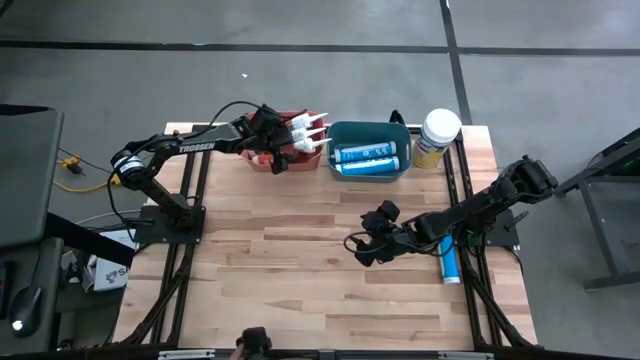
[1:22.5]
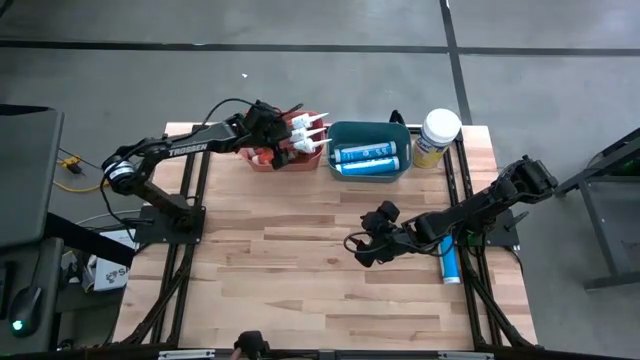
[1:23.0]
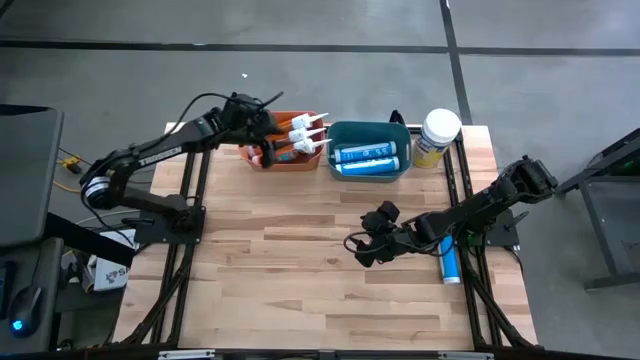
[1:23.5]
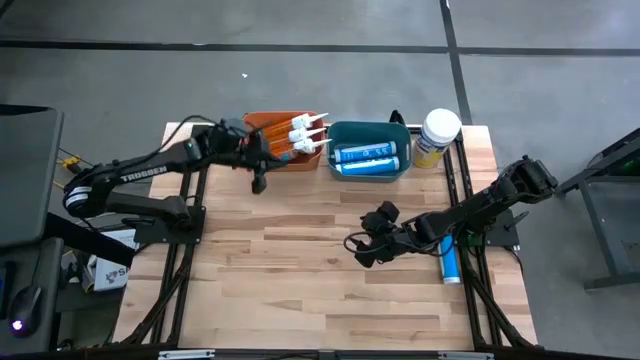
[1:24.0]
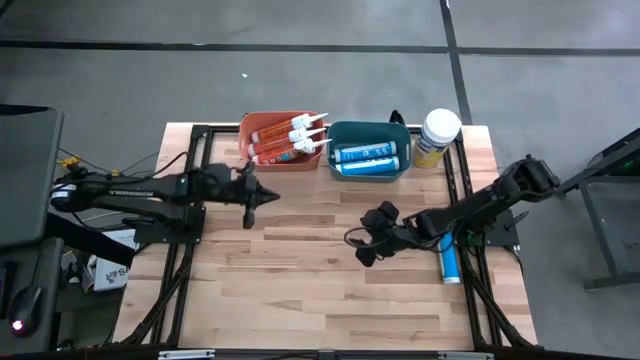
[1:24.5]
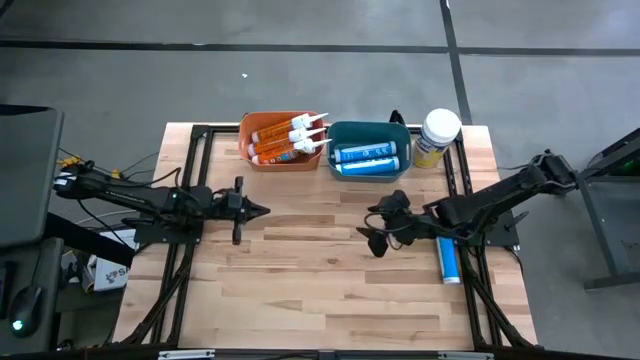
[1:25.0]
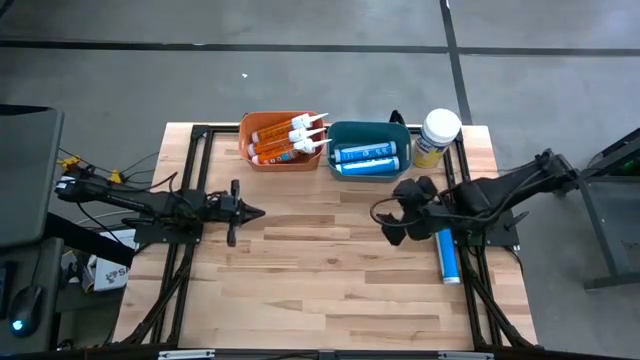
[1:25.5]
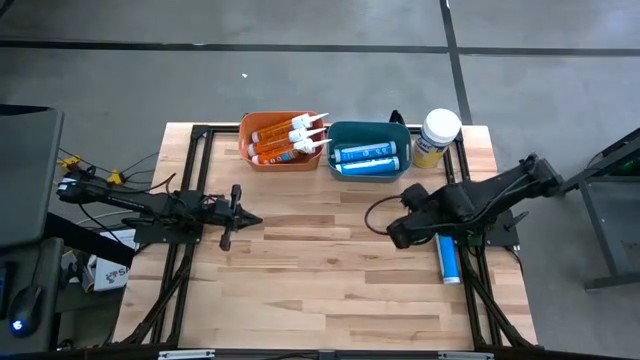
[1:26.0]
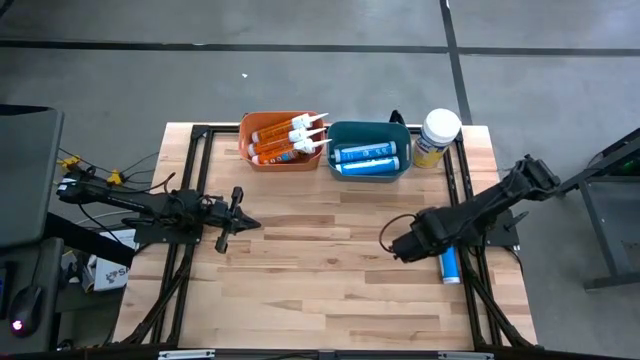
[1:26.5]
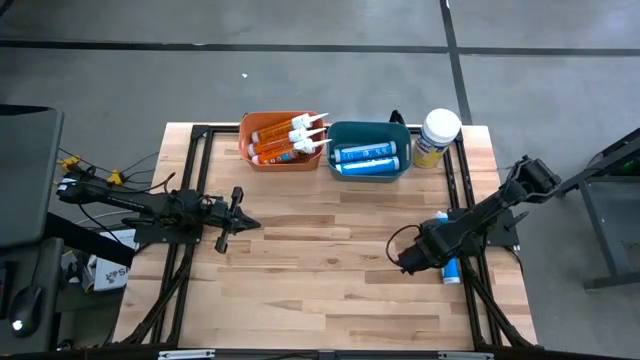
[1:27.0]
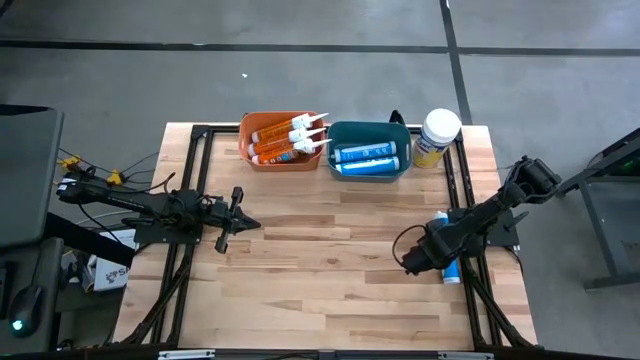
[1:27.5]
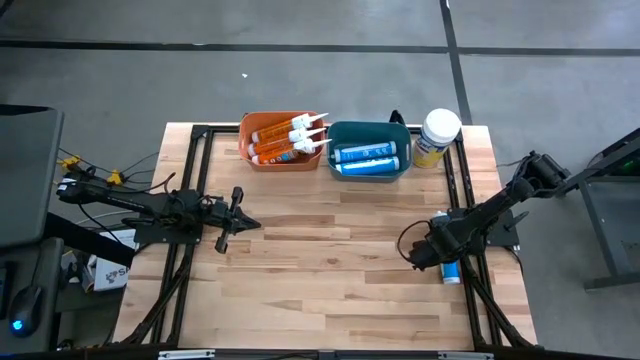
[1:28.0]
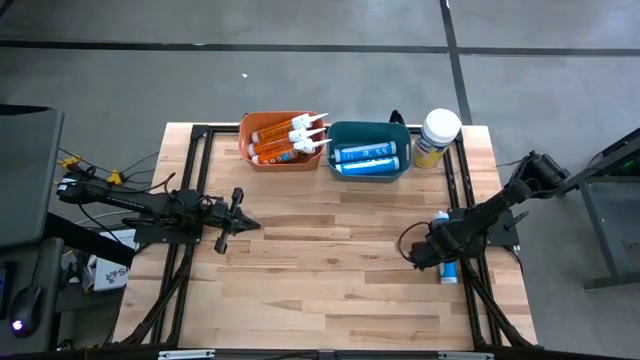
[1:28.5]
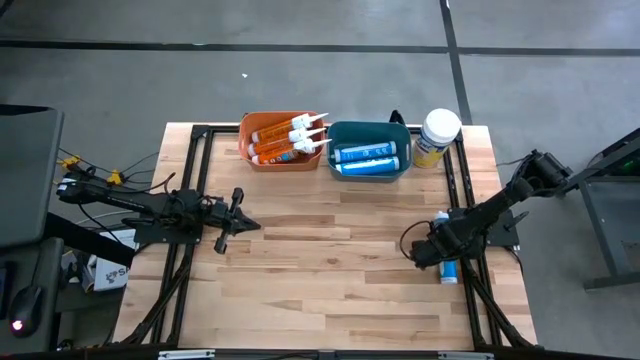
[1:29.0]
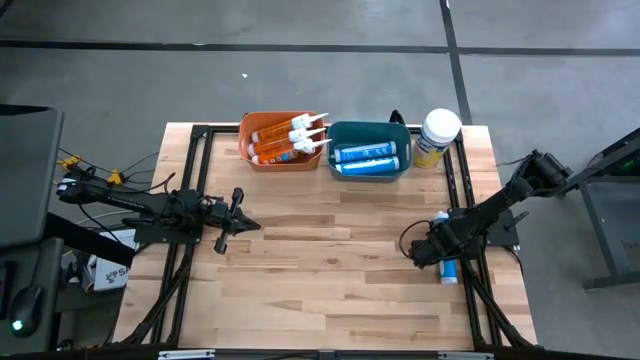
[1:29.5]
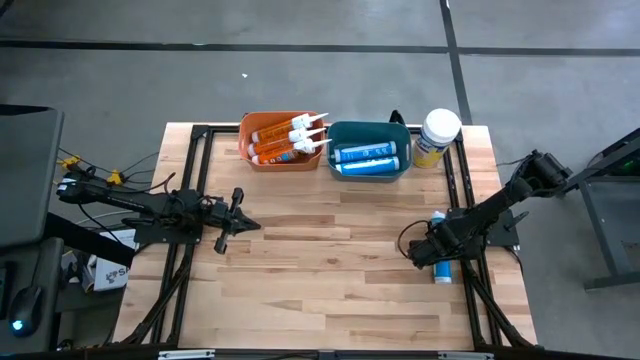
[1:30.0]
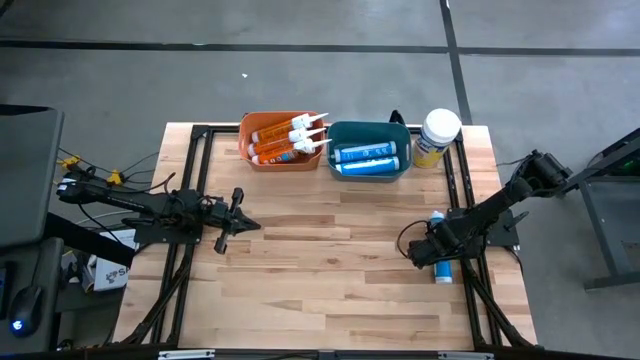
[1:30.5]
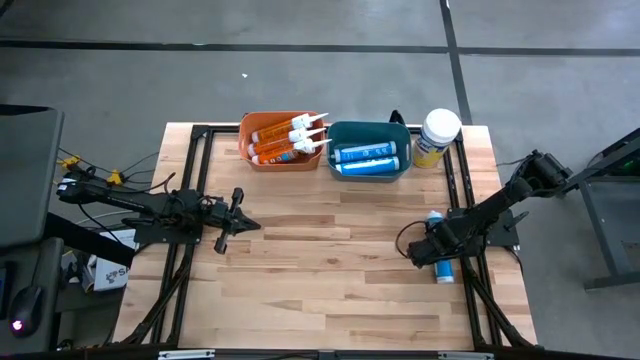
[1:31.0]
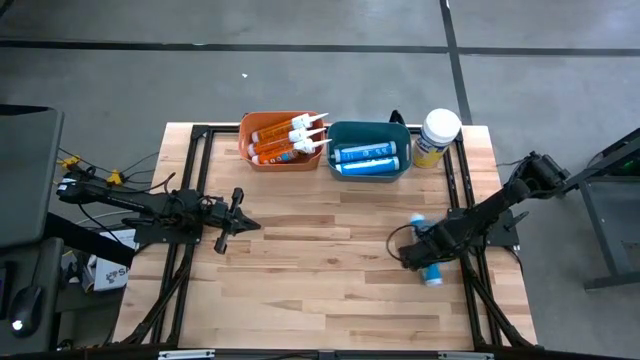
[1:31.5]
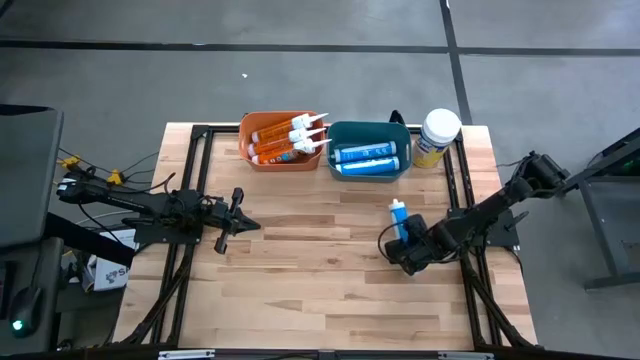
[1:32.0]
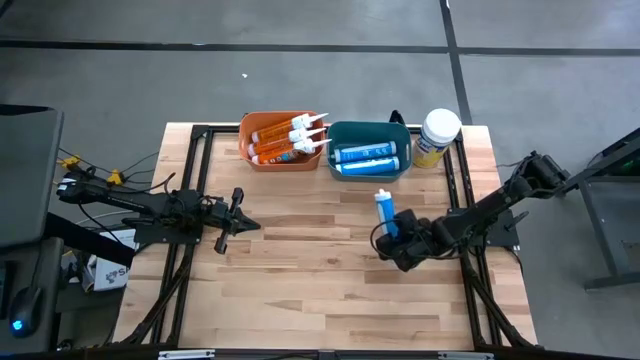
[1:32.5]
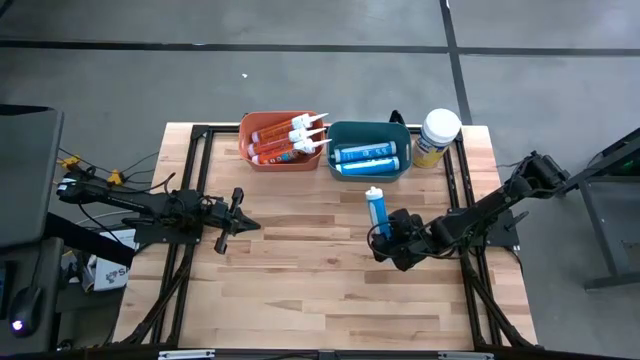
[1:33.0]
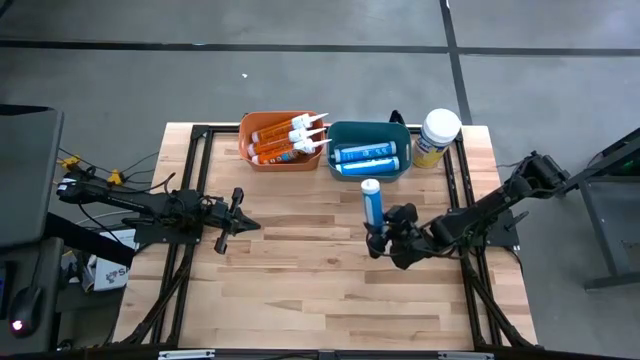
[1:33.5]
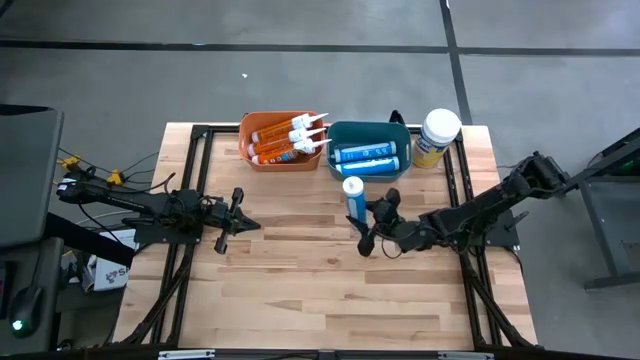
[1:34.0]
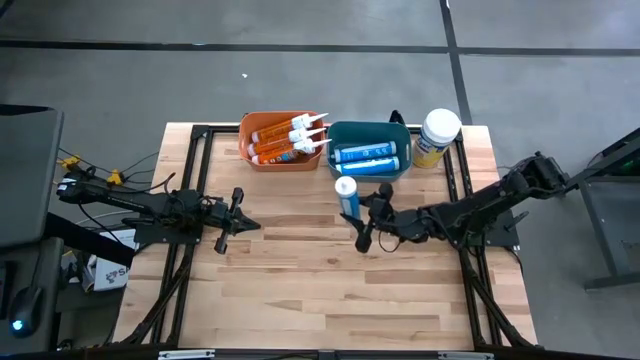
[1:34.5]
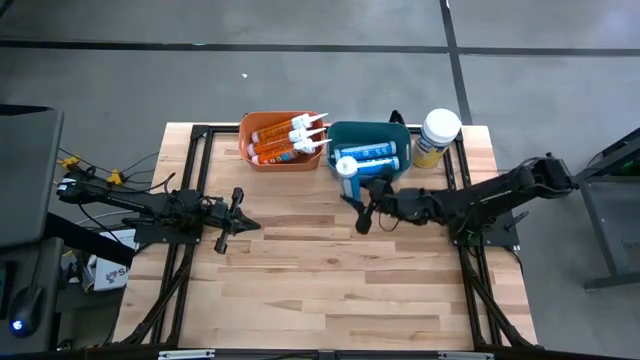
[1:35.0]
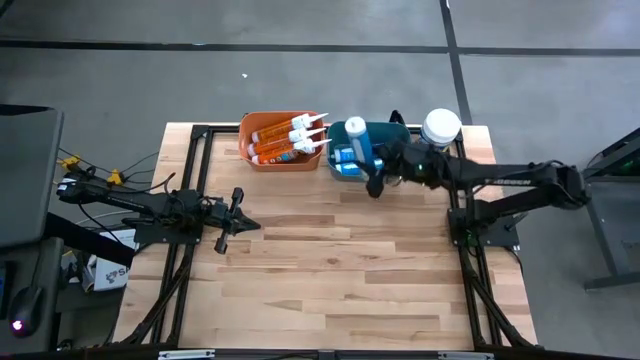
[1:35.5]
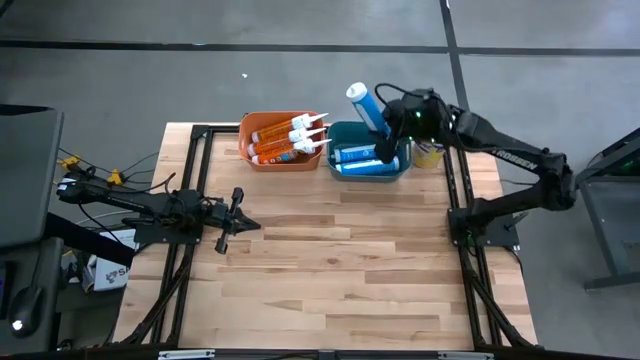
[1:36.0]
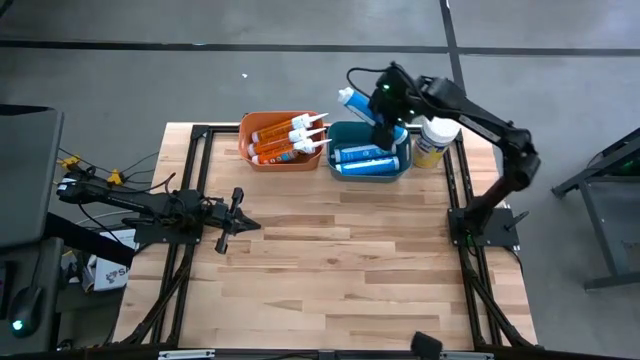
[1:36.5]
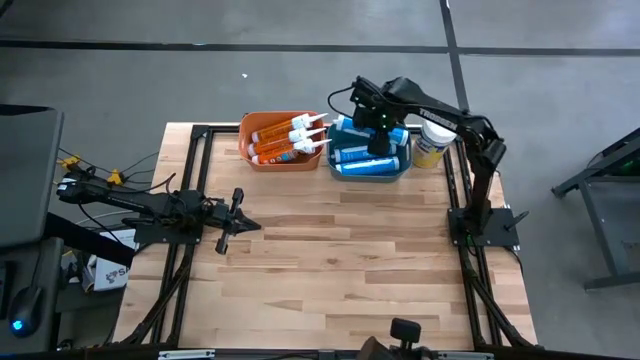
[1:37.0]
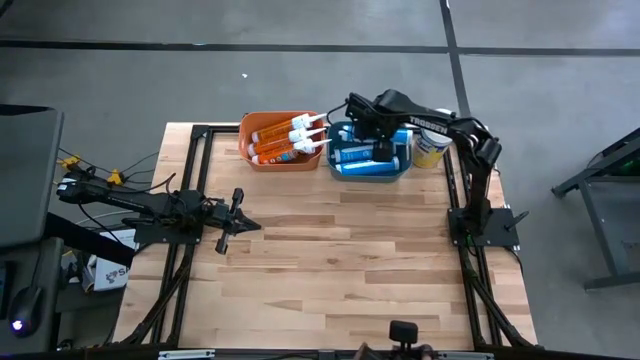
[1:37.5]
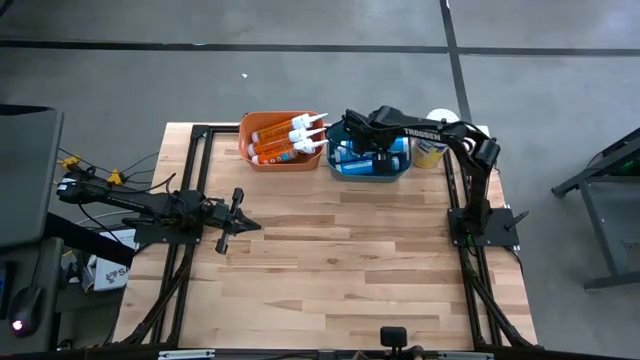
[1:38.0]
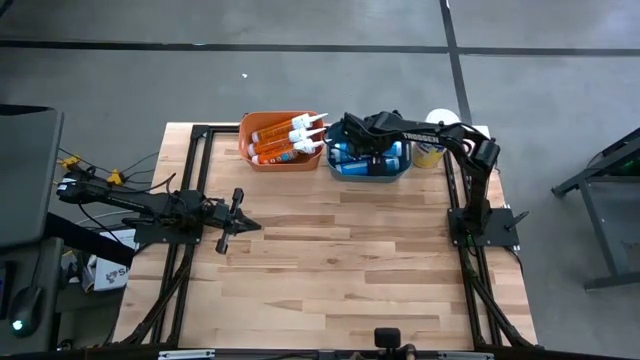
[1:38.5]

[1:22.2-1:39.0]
Task: Pick & place silicon tubes, Sealant and Lysol wipes
Put the blue sealant into the blue bin

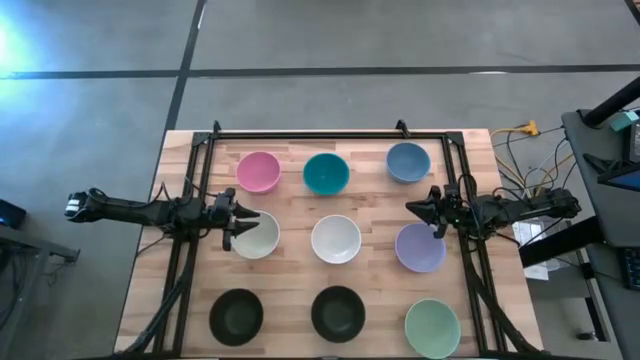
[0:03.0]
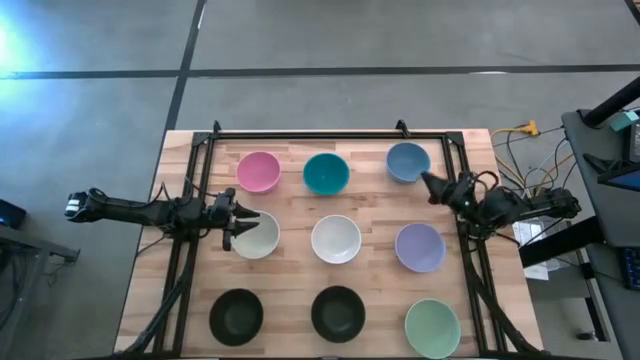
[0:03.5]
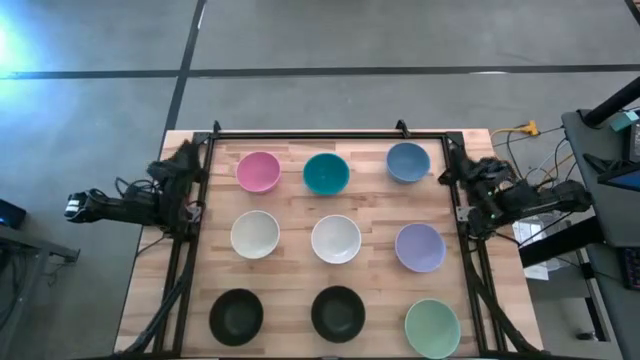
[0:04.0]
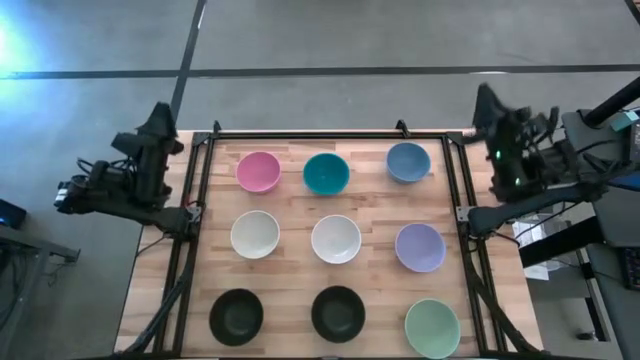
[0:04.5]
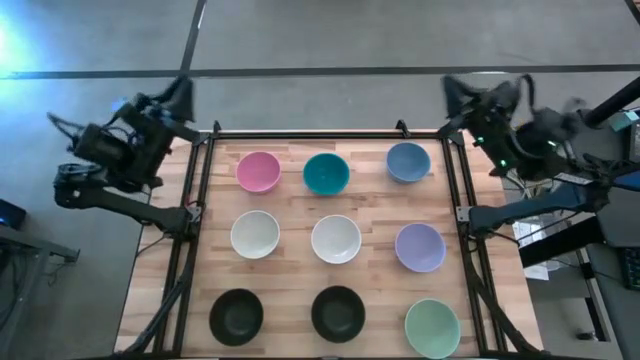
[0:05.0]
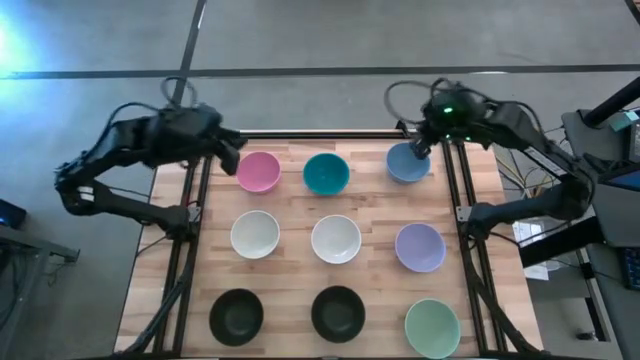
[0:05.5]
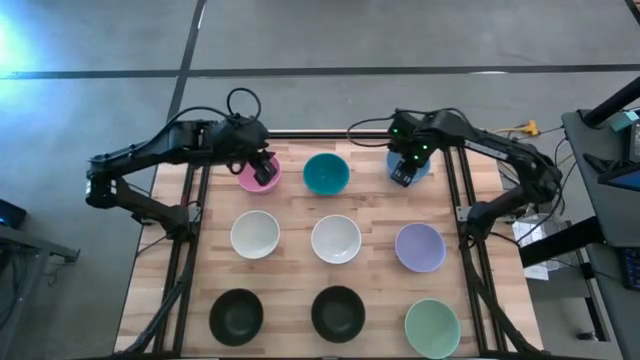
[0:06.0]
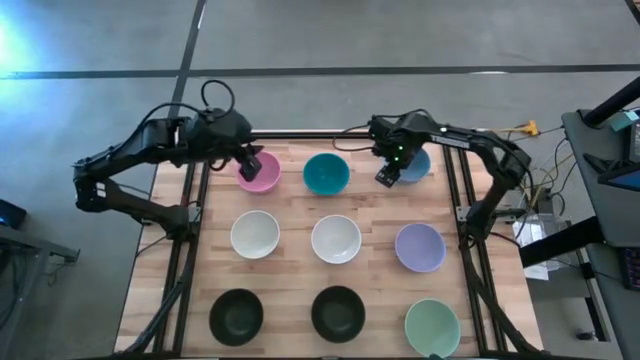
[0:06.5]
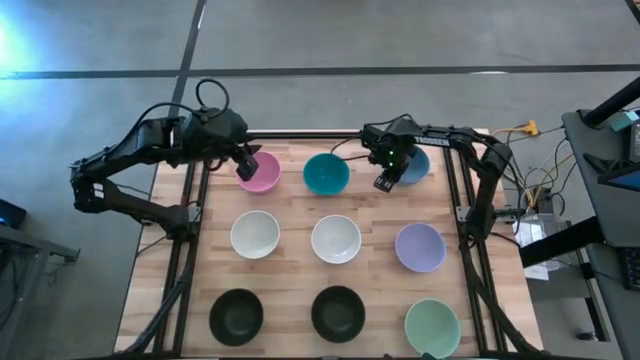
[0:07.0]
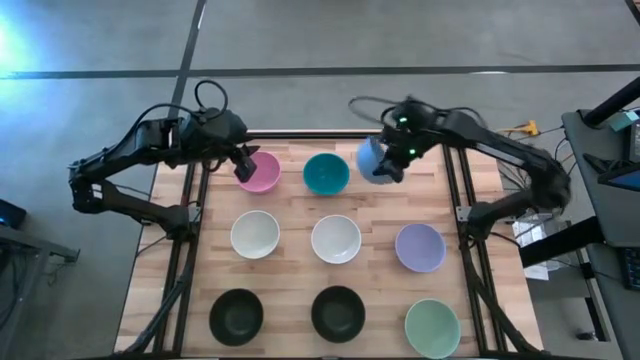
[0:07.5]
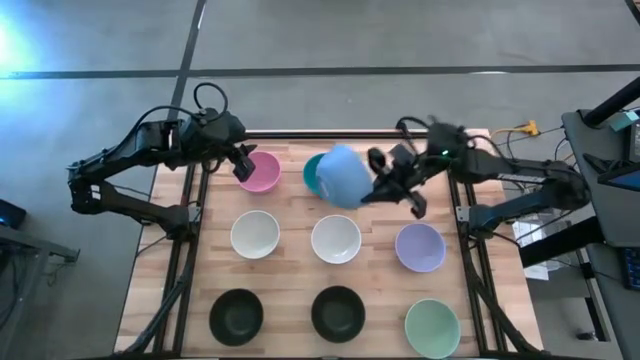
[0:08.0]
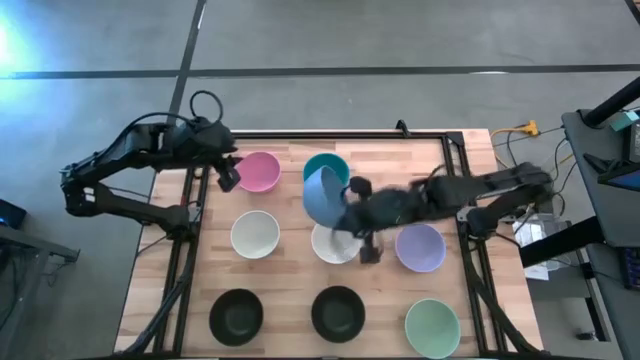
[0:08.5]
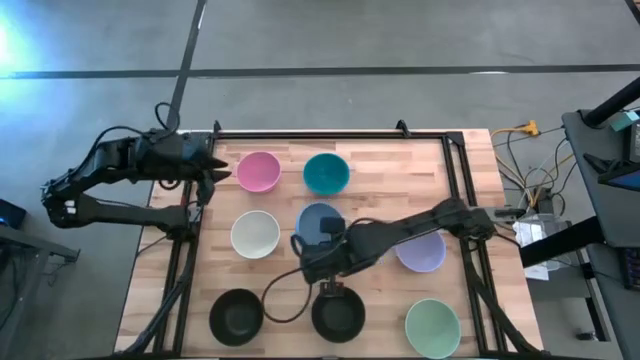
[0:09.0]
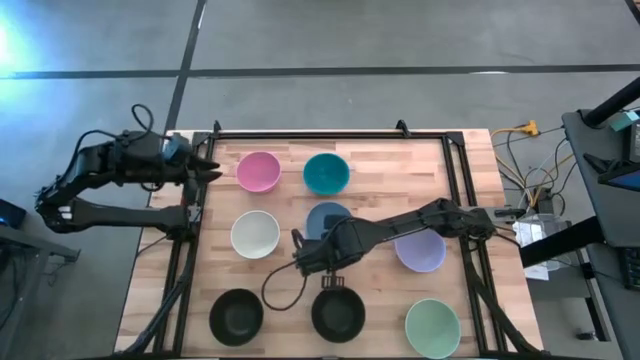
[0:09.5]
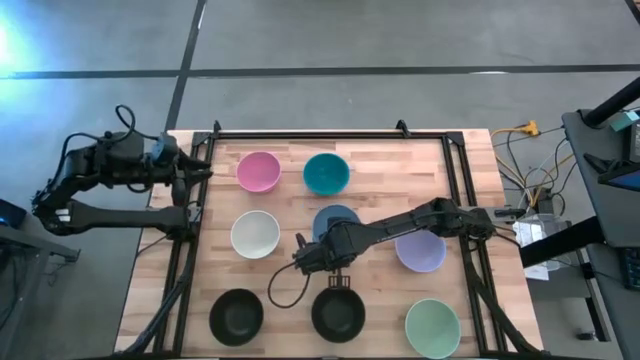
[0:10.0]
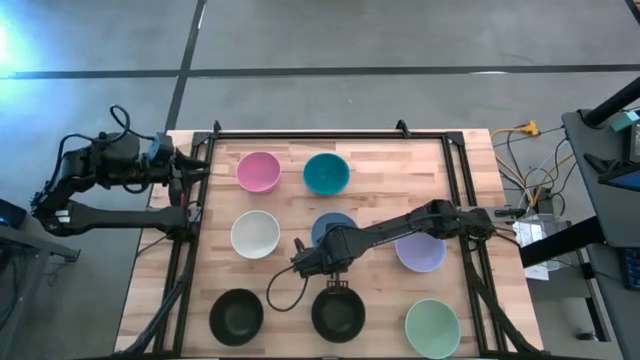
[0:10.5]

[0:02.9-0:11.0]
Task: Nest bowls inside each other
Stack the light blue bowl on top of the right white bowl
